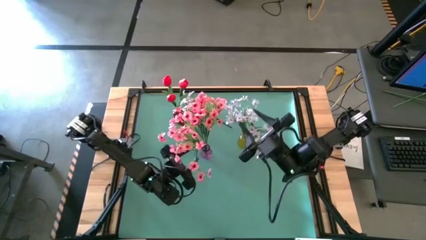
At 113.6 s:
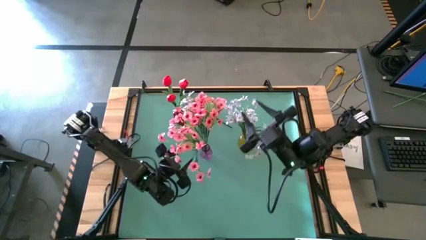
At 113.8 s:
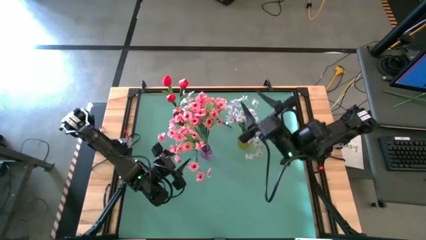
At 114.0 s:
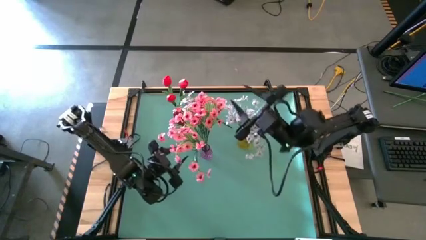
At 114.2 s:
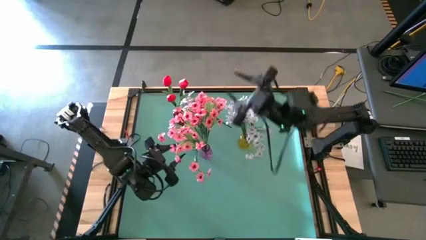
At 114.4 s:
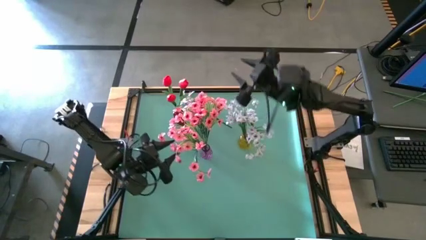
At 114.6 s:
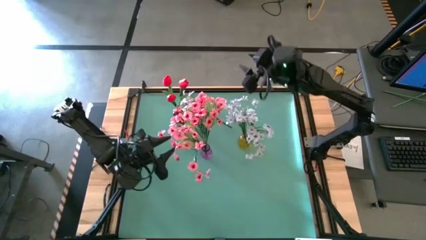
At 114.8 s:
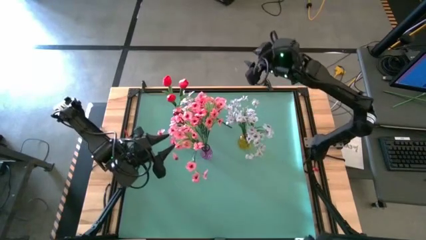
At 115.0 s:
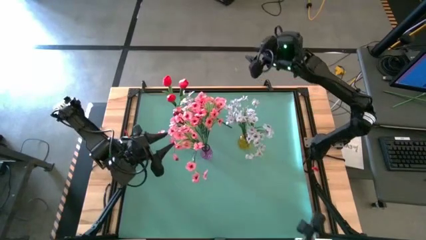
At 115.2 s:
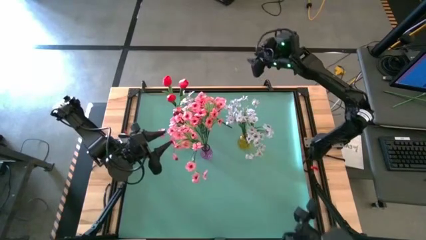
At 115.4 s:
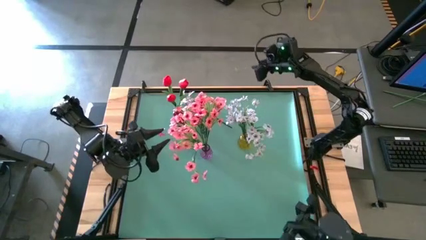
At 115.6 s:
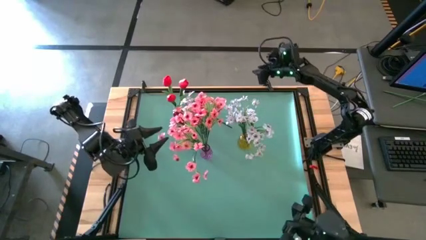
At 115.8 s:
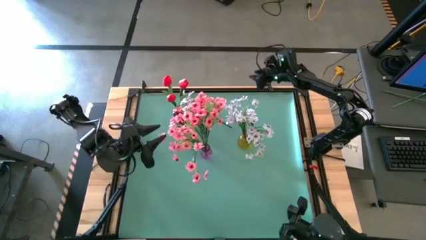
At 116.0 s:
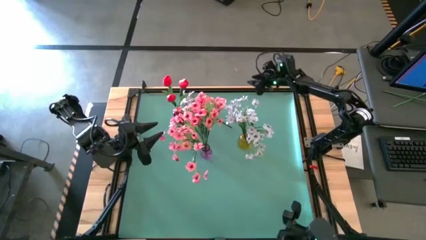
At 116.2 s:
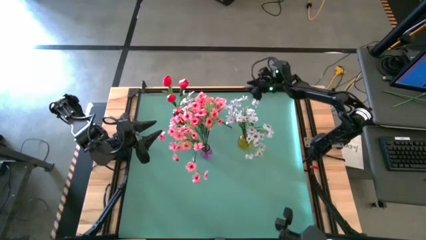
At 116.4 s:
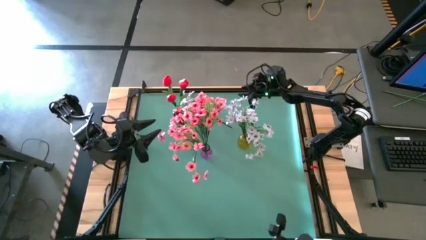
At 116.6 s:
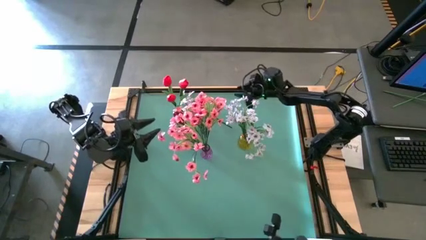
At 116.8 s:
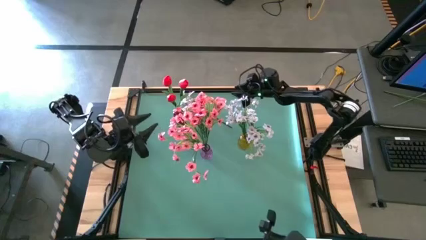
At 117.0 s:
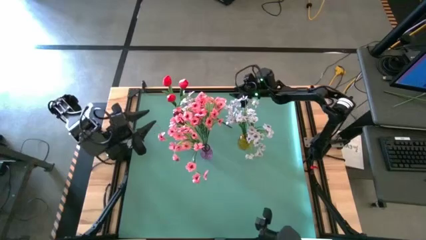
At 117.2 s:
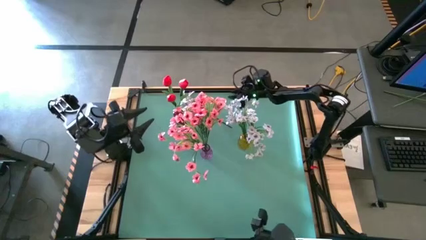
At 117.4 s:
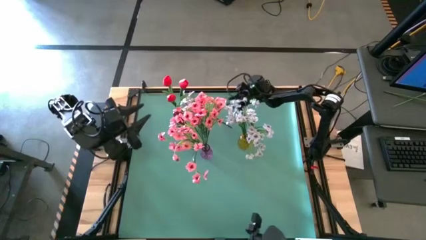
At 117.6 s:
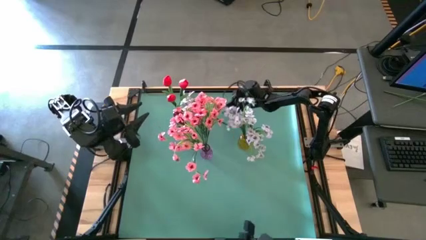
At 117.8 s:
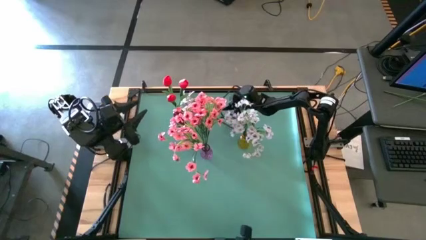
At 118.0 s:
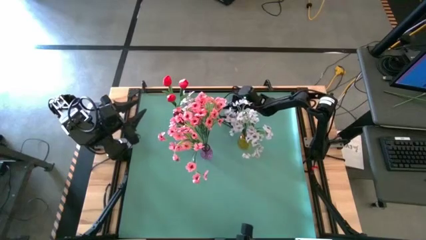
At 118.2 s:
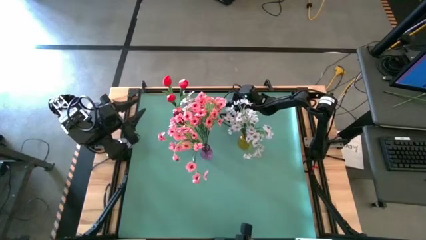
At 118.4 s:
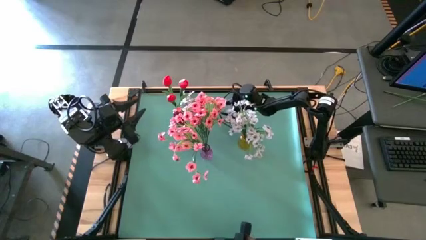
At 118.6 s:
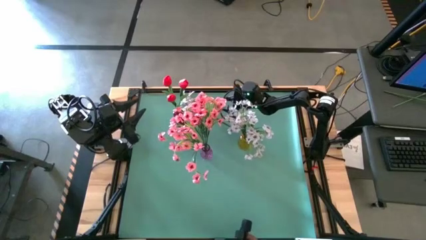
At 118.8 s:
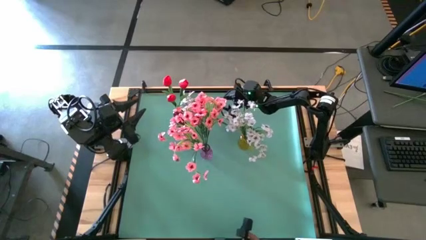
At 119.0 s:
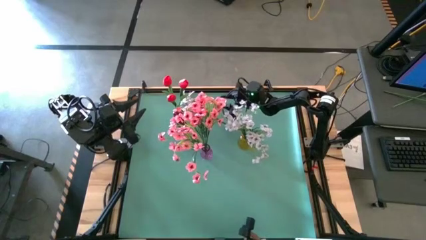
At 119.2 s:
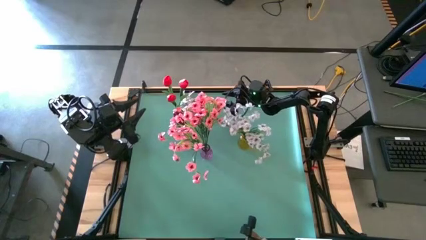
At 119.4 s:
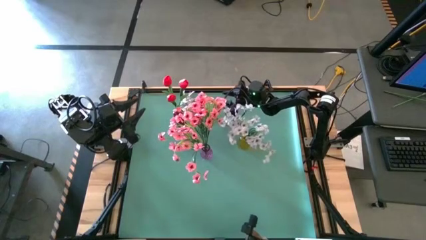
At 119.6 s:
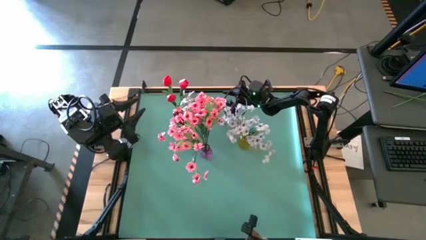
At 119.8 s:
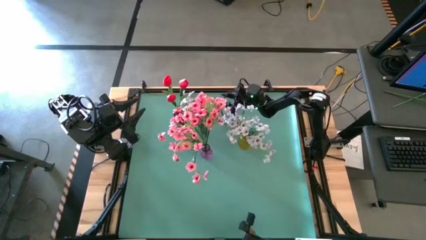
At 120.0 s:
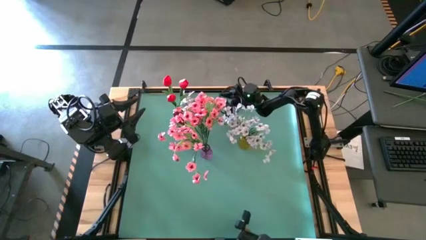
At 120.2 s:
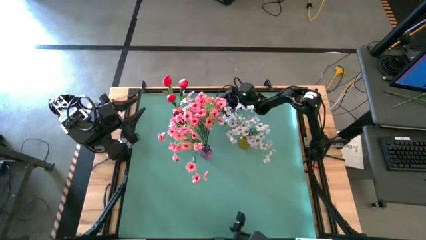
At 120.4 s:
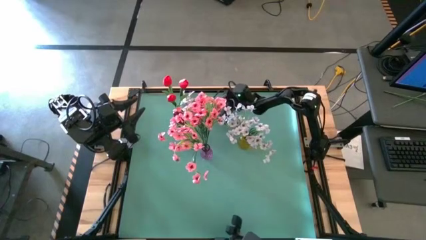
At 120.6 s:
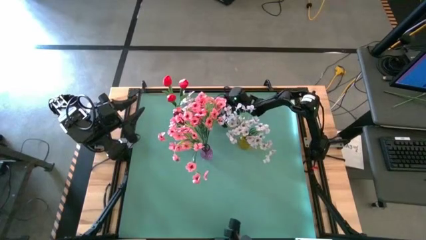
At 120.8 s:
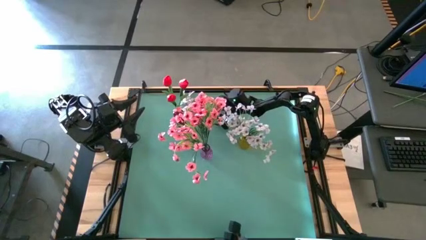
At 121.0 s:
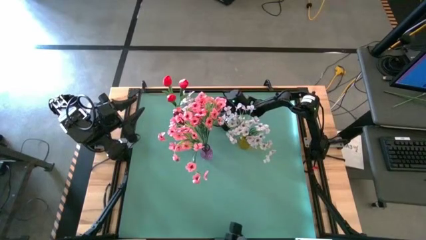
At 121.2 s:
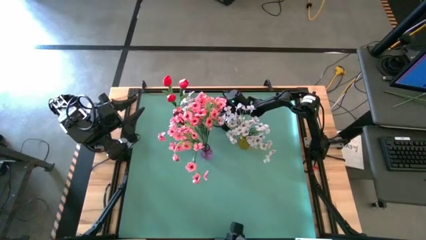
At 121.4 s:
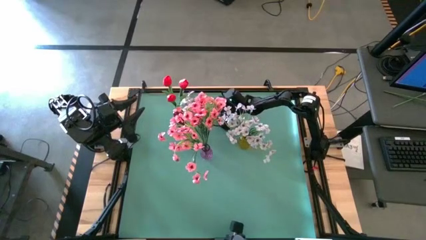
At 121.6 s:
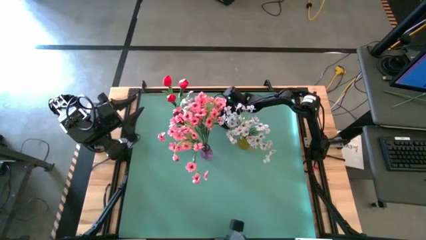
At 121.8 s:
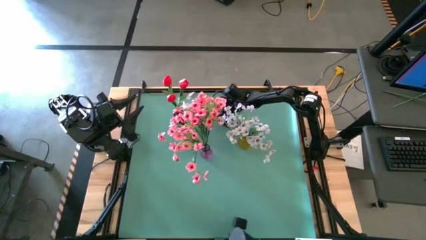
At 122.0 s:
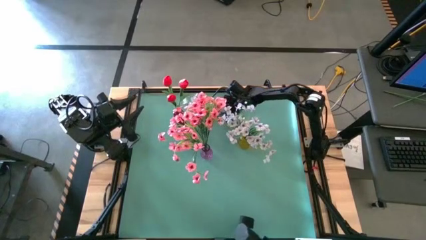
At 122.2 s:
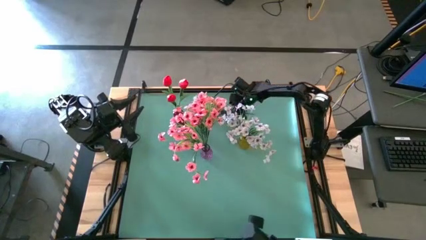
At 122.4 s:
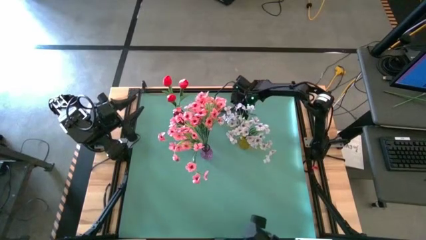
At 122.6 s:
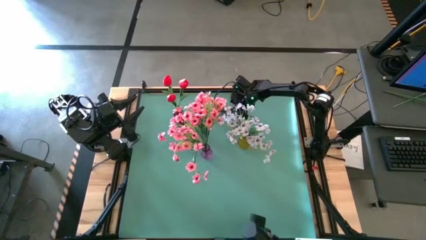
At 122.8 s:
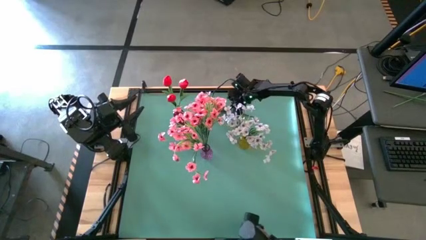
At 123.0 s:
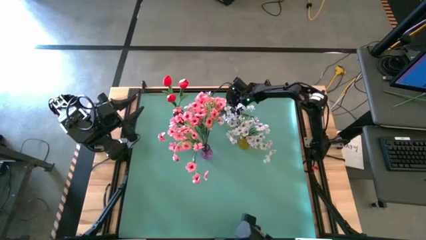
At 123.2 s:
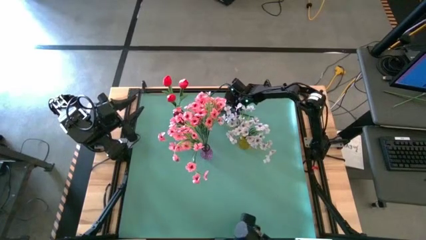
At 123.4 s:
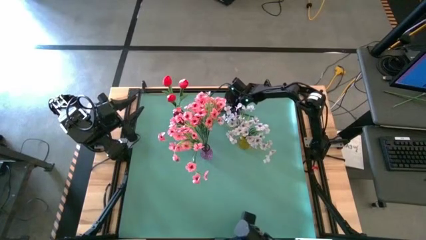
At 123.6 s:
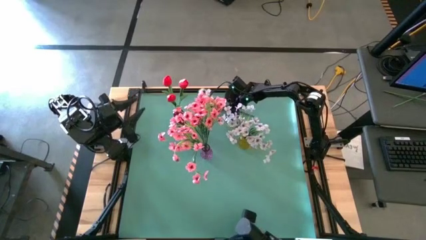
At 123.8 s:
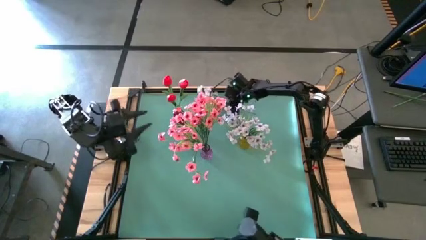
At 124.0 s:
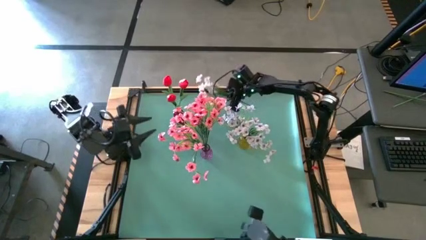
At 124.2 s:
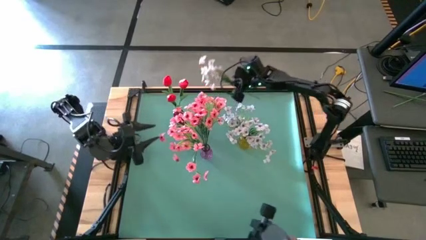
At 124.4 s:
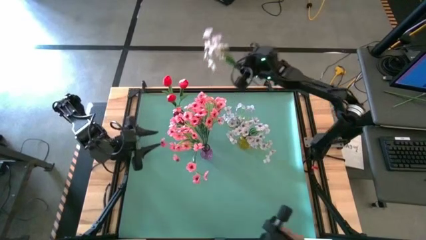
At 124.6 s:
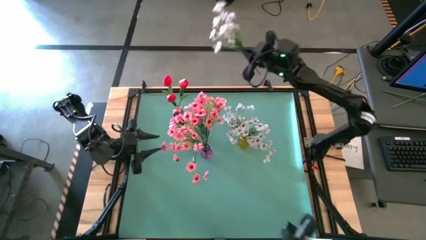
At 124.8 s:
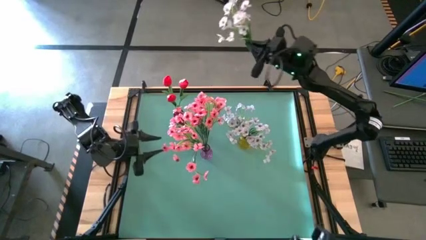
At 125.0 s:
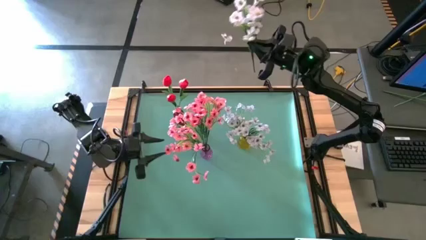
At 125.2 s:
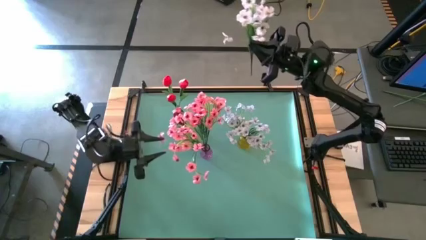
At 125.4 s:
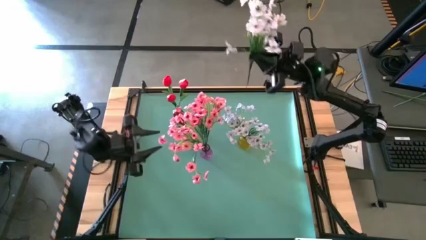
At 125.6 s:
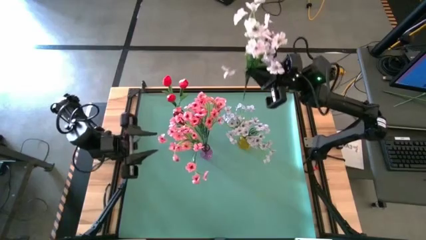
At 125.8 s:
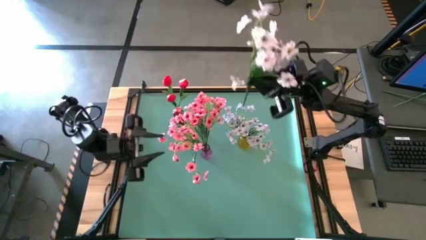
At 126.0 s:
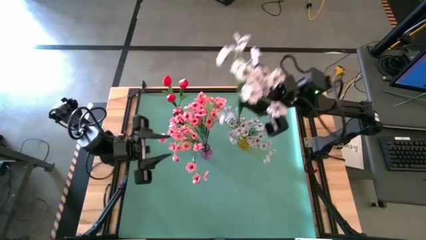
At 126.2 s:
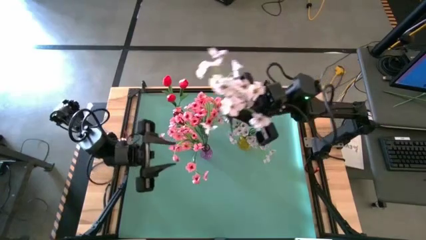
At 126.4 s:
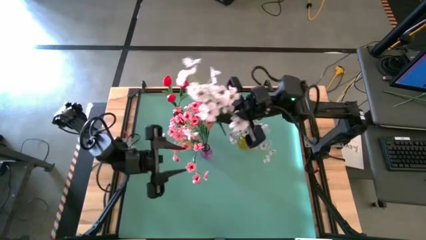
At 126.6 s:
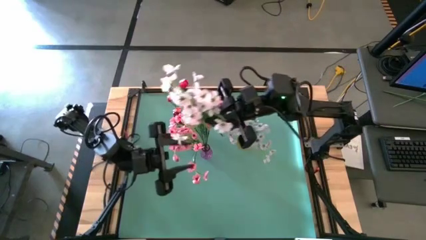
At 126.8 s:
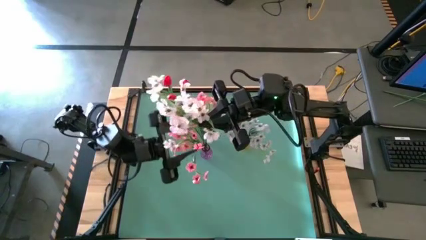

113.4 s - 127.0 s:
Task: Sort flowers into vase by color
Put the white flower into the yellow vase
